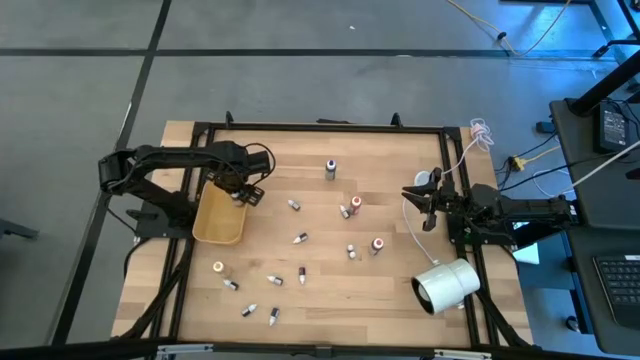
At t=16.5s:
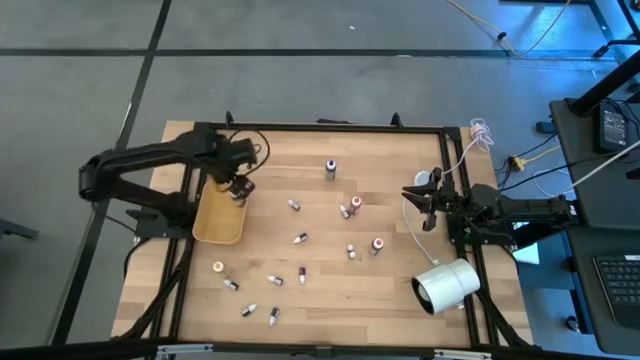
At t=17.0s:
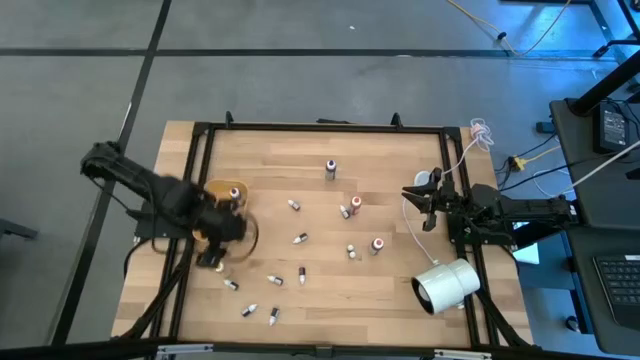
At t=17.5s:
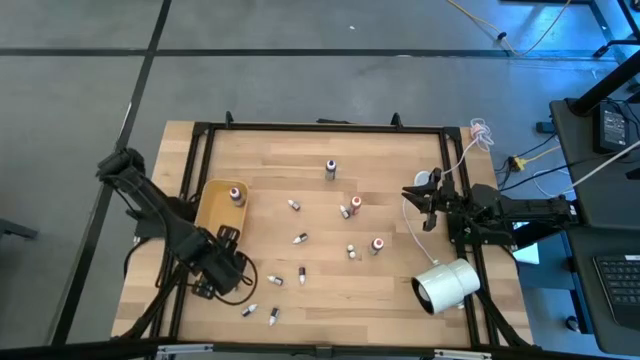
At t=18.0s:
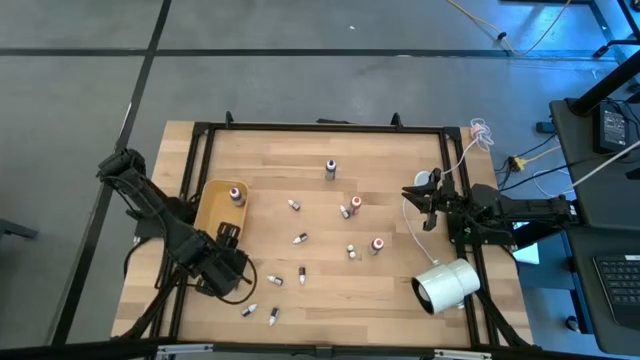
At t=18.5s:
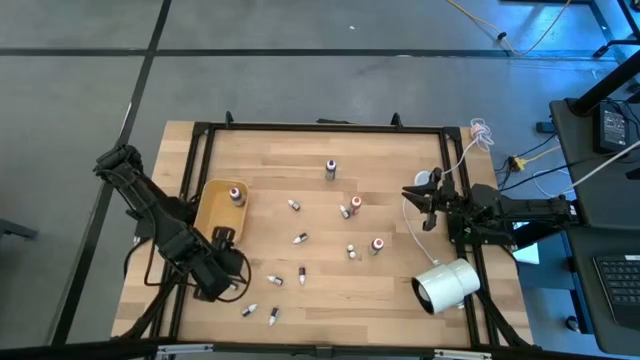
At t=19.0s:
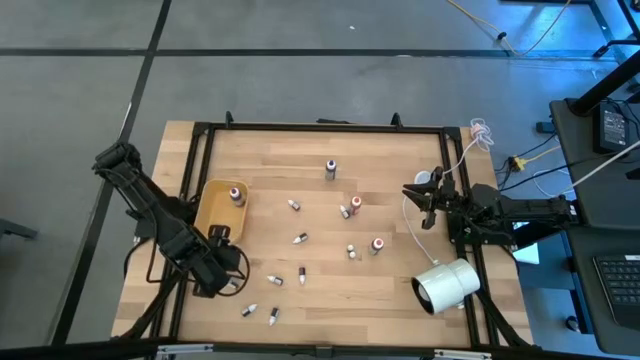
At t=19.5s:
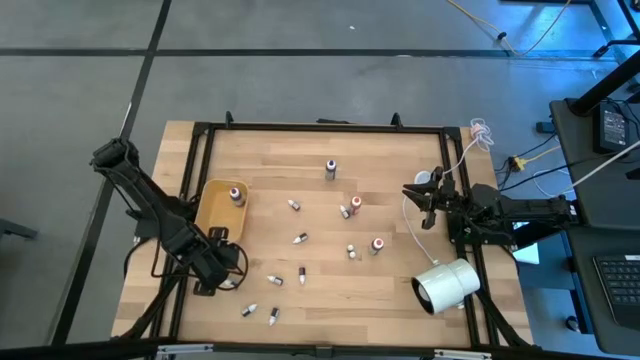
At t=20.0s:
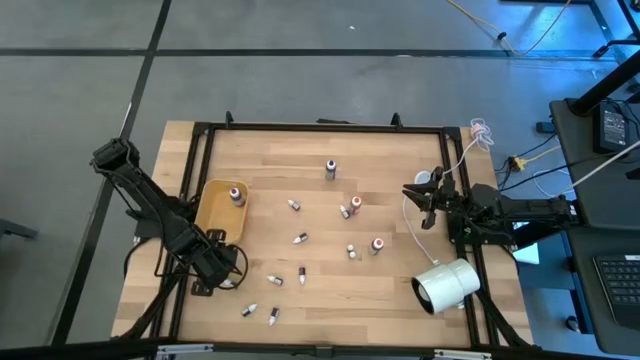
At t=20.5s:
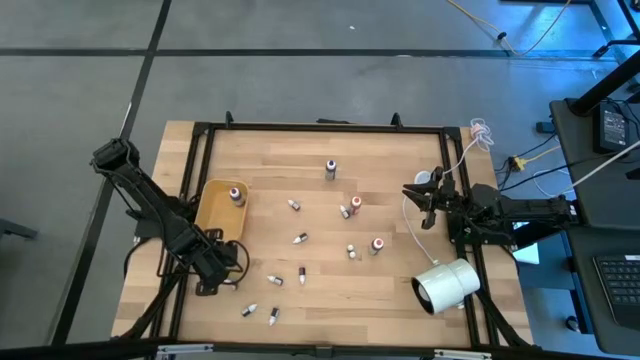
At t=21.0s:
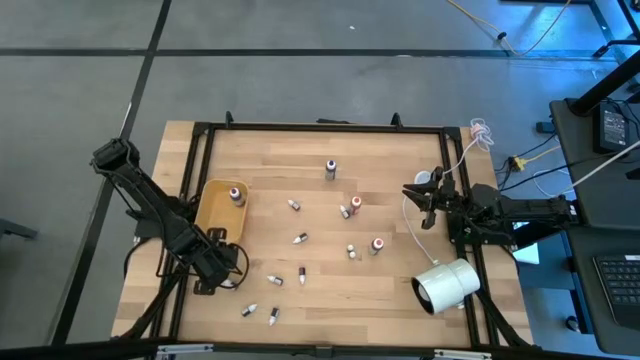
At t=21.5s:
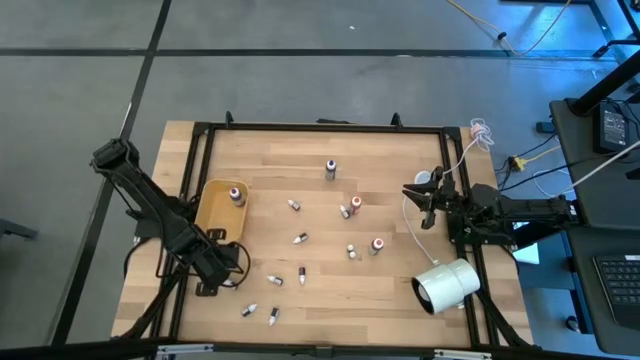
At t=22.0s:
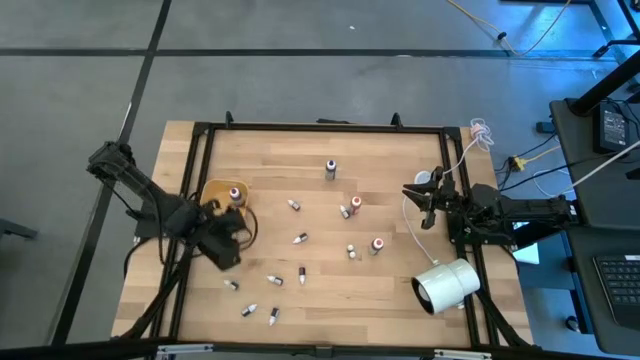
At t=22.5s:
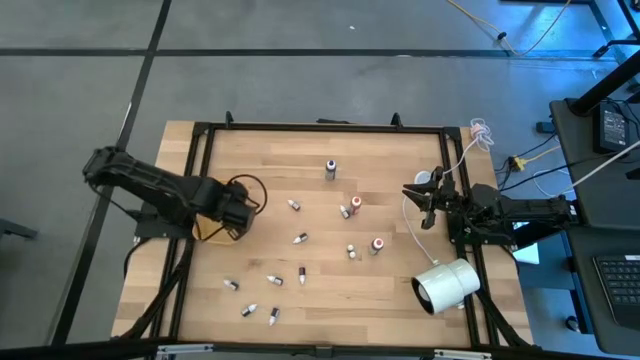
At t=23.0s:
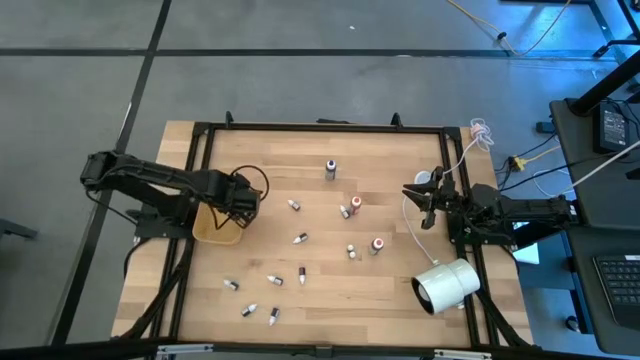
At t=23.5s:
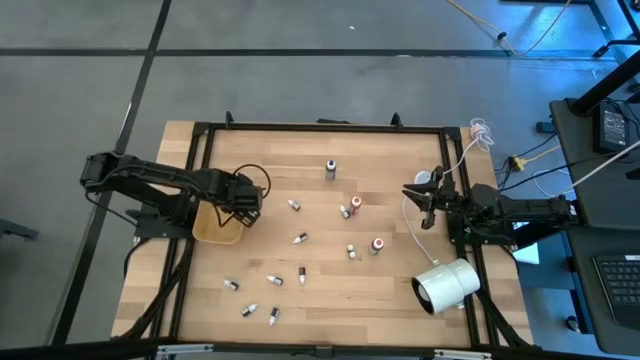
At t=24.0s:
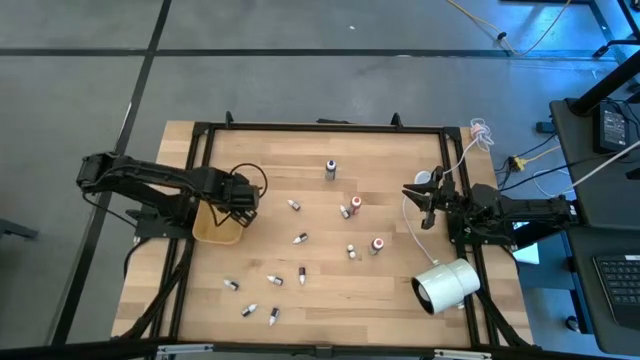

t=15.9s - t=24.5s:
Task: Pick & Place food coloring
Put the large yellow food coloring bottle into the yellow bin

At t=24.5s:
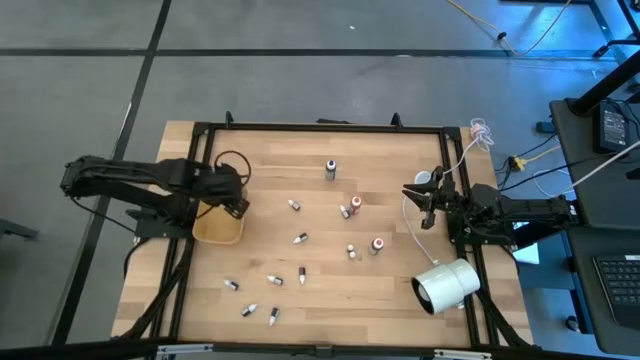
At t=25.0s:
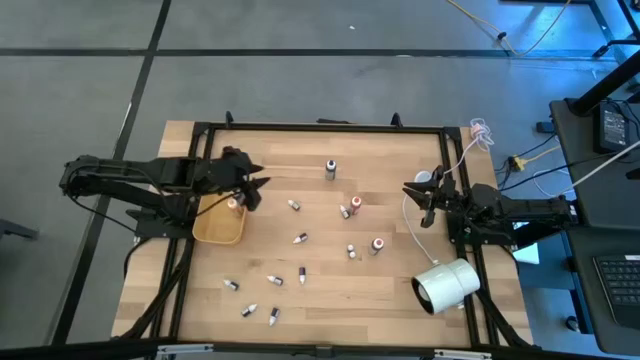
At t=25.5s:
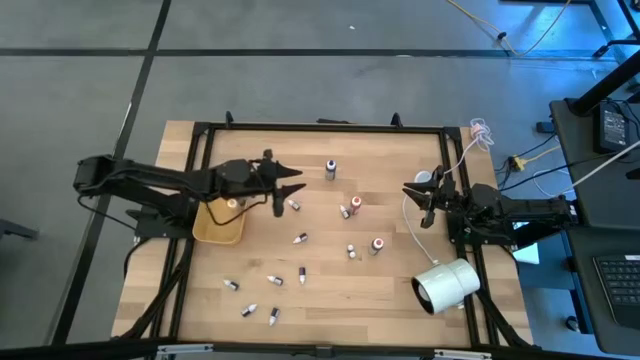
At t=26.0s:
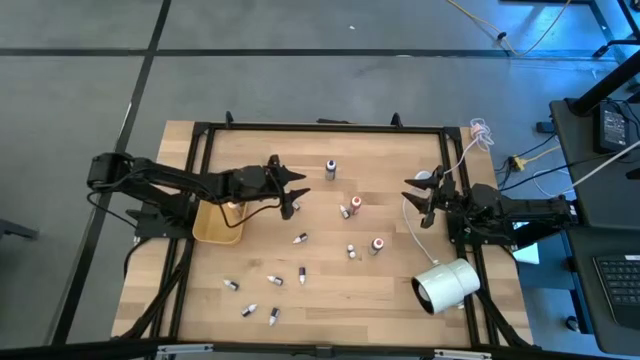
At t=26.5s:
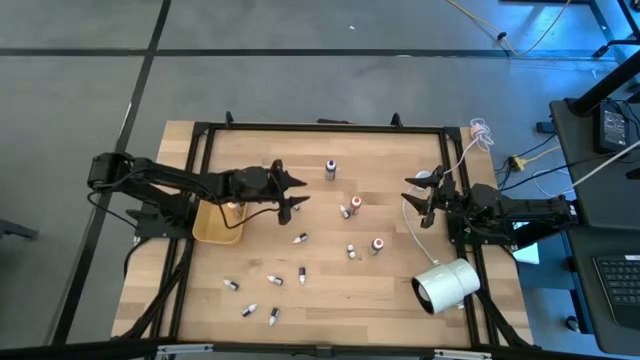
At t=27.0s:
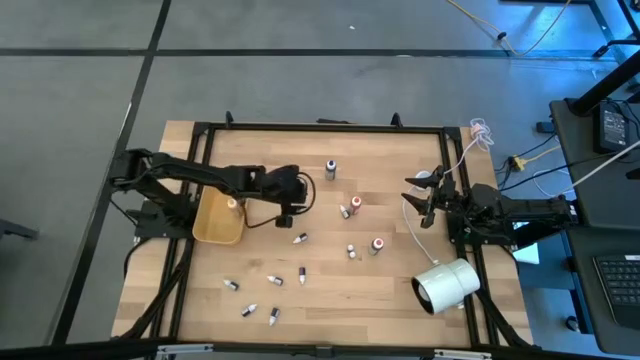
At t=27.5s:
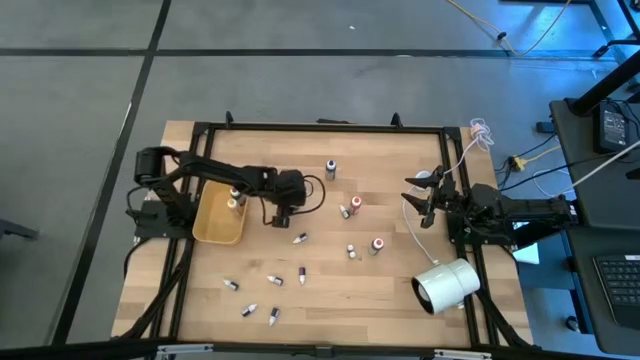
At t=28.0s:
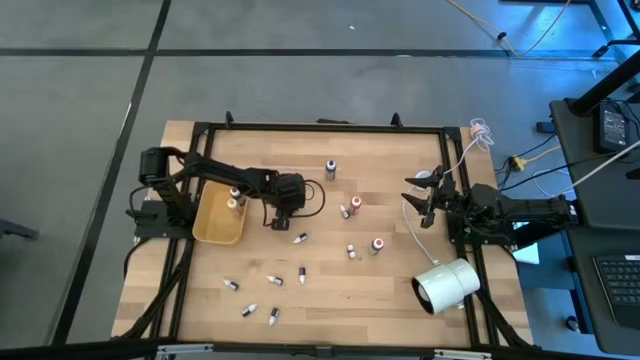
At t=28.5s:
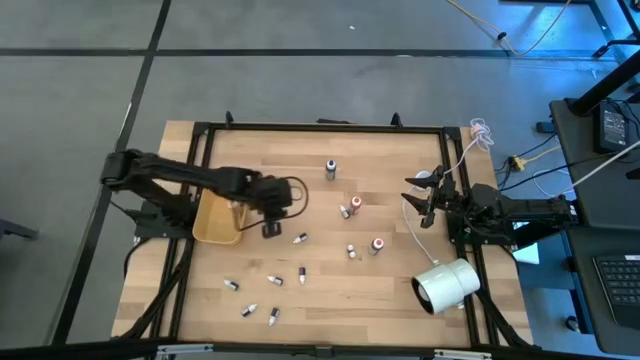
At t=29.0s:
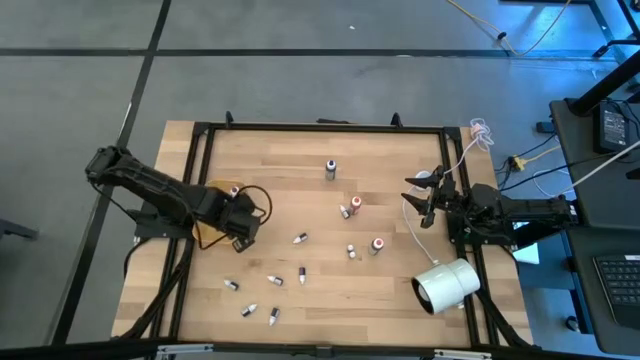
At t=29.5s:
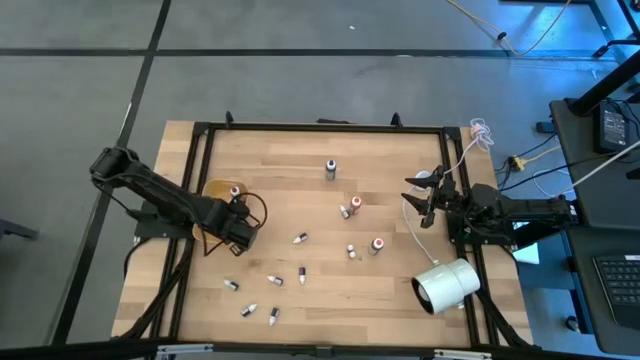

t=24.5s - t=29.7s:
Put the small red food coloring bottle into the yellow bin

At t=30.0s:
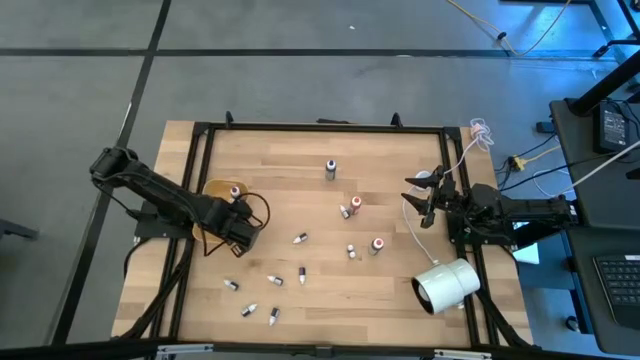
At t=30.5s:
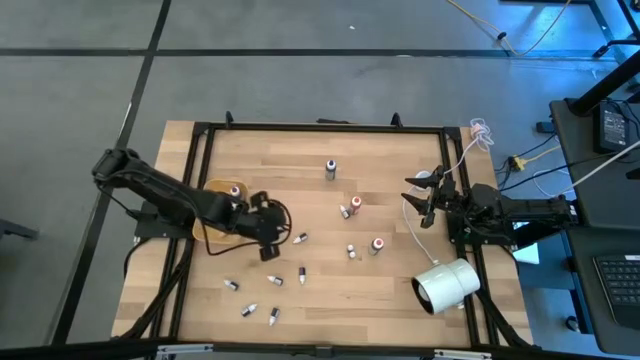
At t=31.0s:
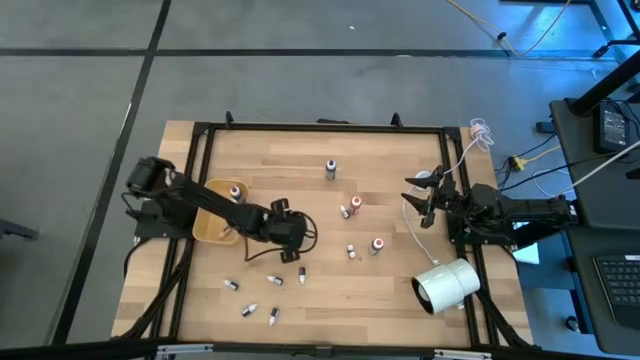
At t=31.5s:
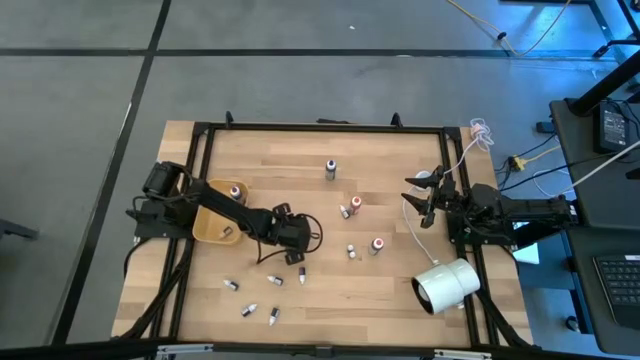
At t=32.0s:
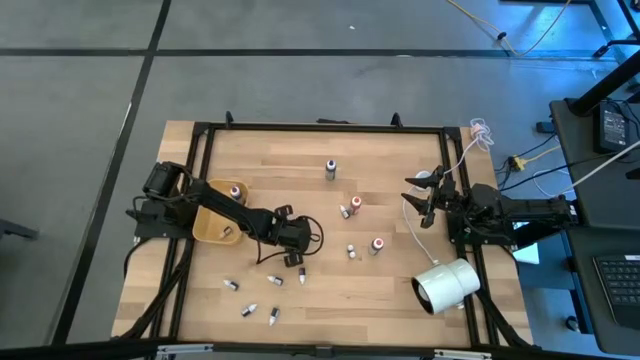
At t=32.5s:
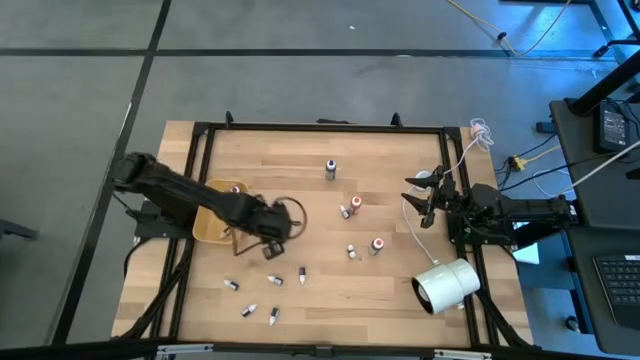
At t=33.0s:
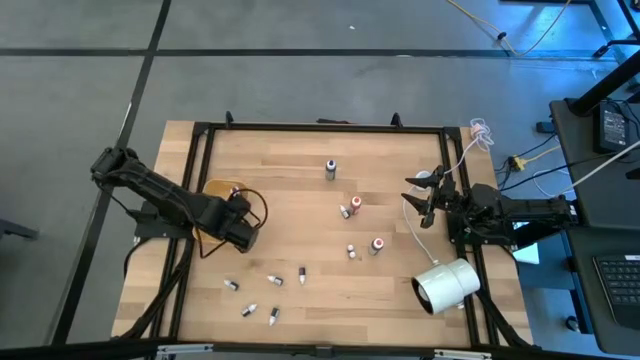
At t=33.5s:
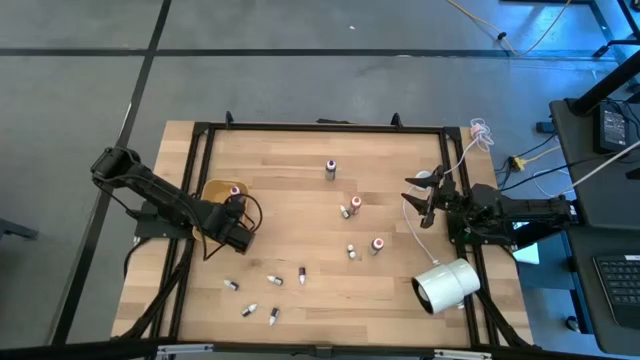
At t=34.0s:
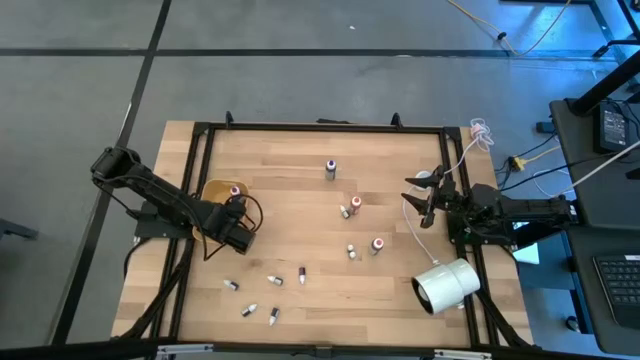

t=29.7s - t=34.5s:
Put the small green food coloring bottle into the yellow bin

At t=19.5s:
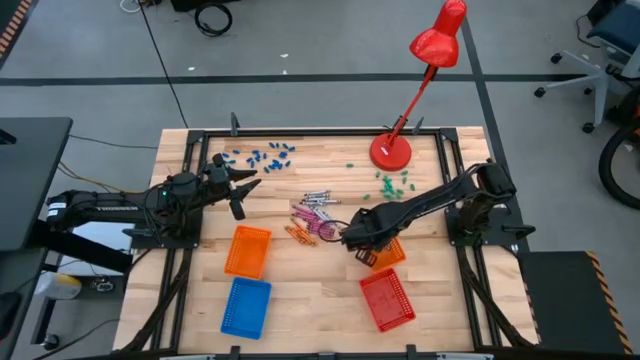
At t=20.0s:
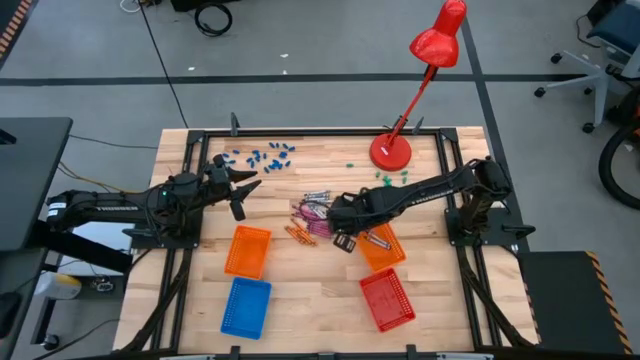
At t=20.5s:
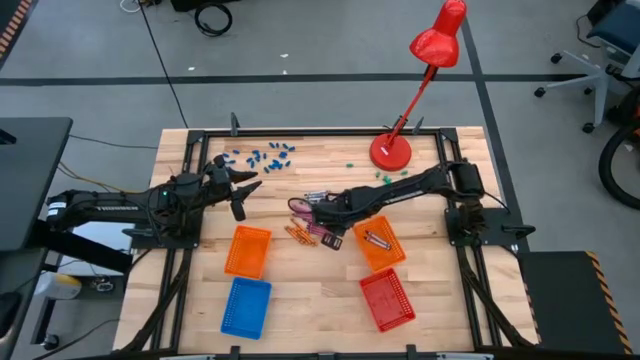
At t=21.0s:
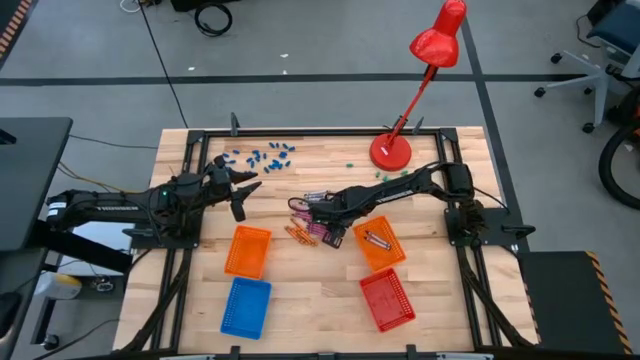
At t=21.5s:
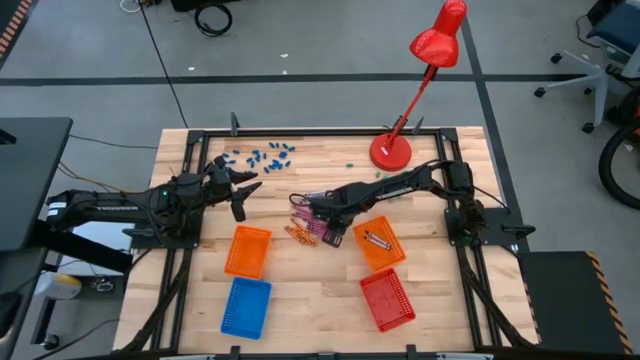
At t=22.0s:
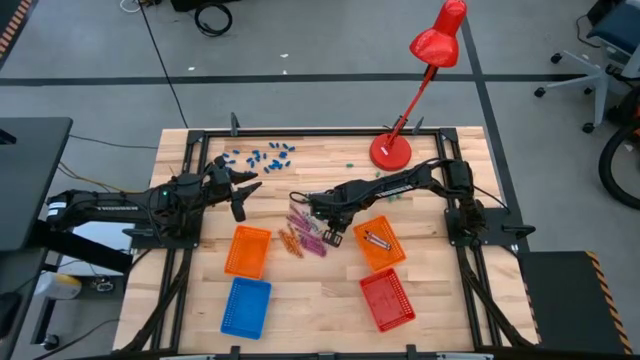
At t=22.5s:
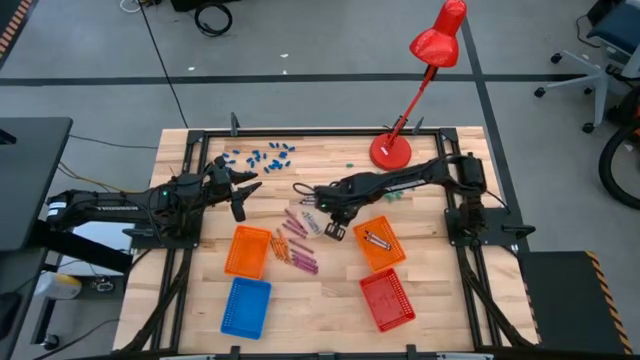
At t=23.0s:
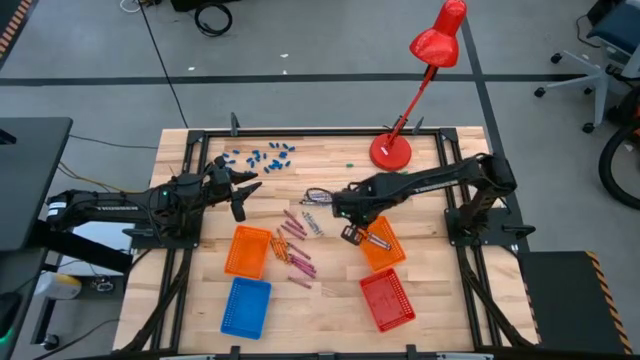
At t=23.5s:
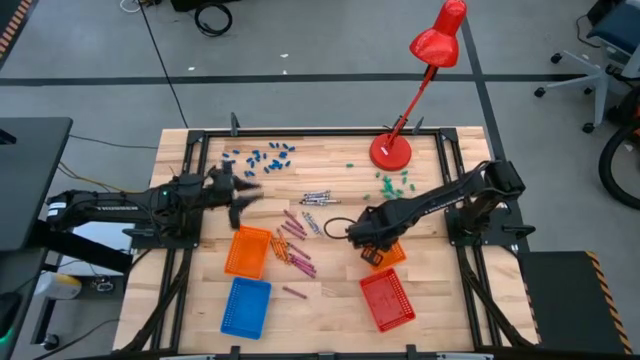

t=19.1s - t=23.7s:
Task: Sort crayons
Put the black crayon into the right orange bin
